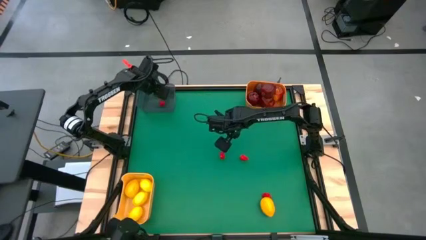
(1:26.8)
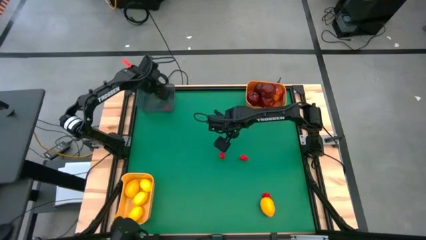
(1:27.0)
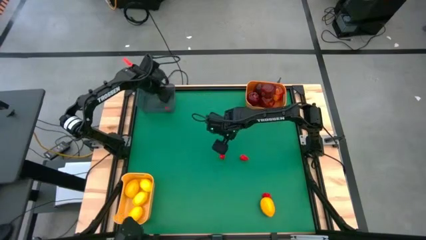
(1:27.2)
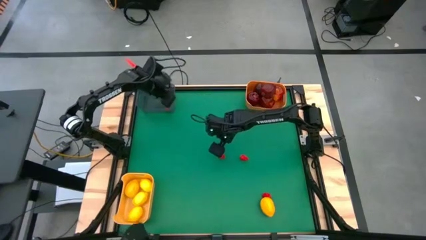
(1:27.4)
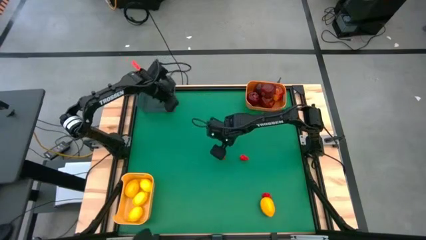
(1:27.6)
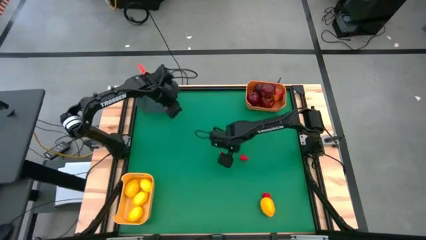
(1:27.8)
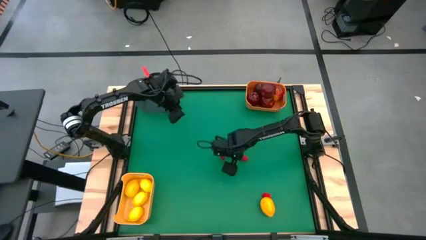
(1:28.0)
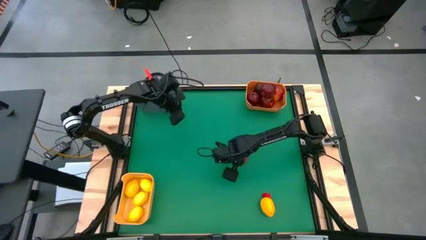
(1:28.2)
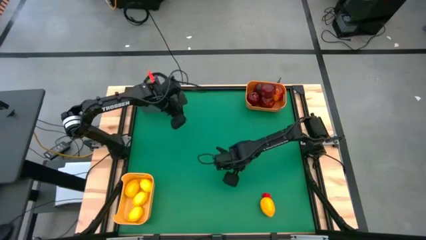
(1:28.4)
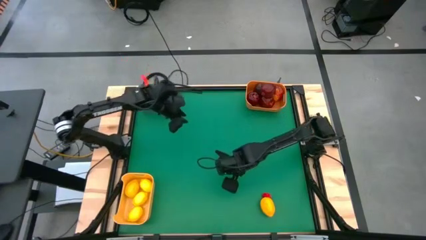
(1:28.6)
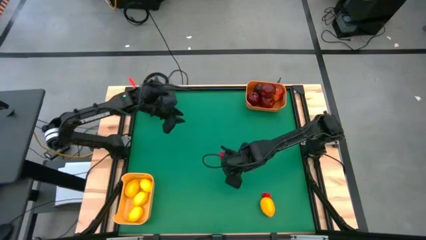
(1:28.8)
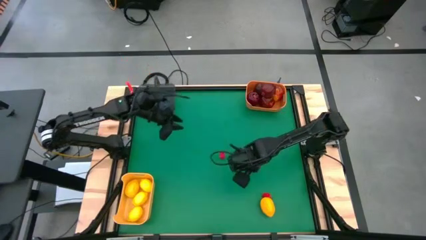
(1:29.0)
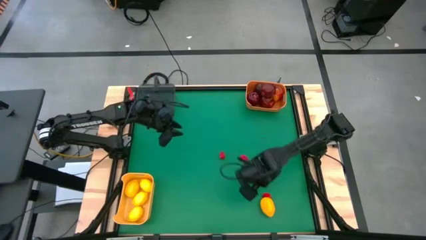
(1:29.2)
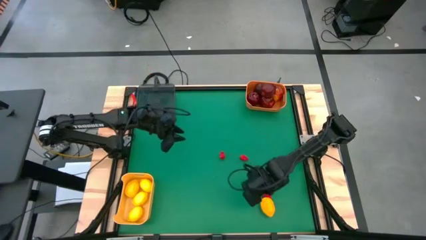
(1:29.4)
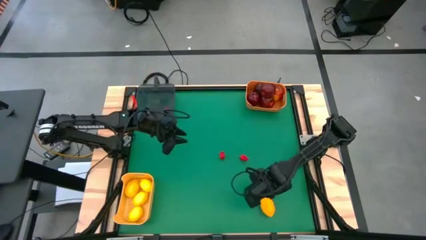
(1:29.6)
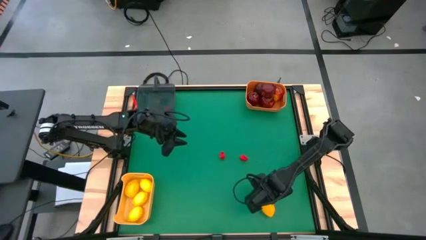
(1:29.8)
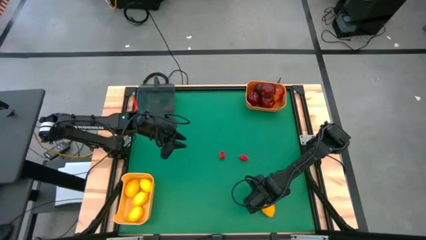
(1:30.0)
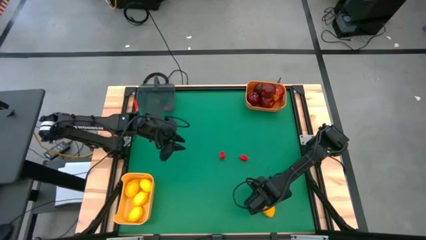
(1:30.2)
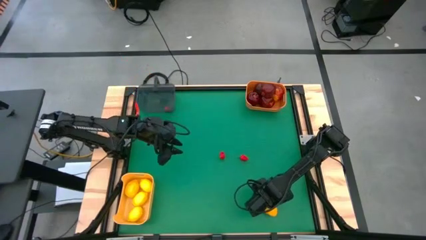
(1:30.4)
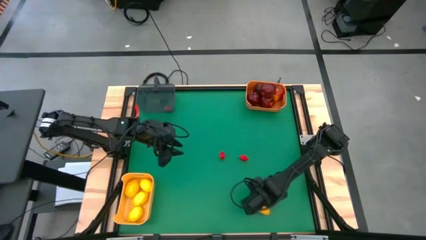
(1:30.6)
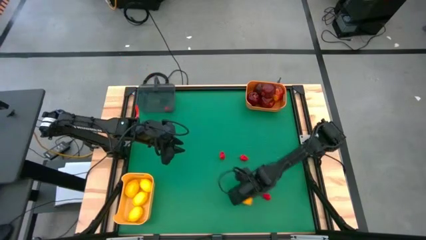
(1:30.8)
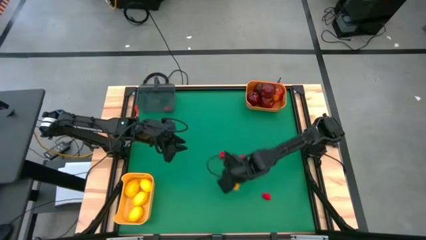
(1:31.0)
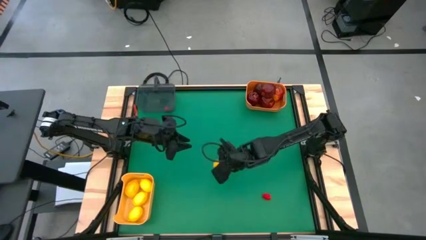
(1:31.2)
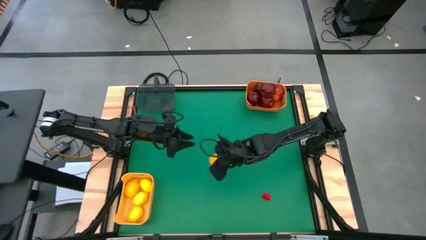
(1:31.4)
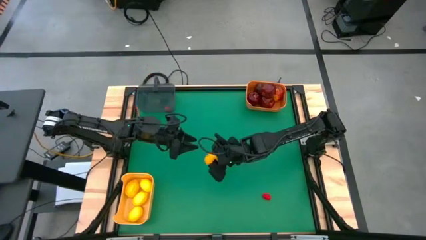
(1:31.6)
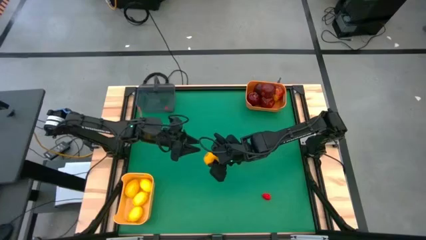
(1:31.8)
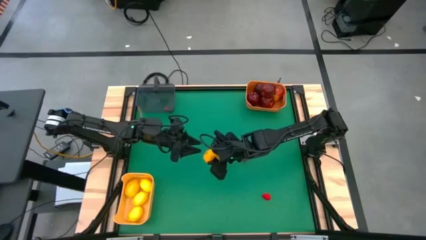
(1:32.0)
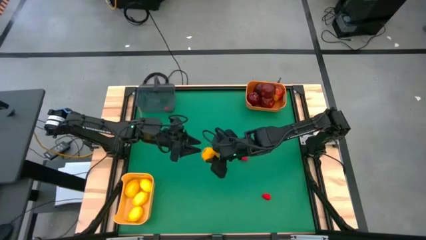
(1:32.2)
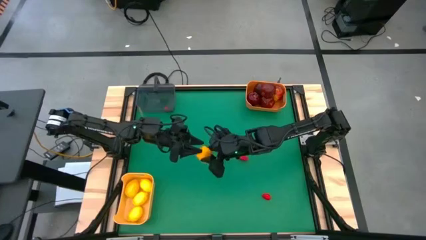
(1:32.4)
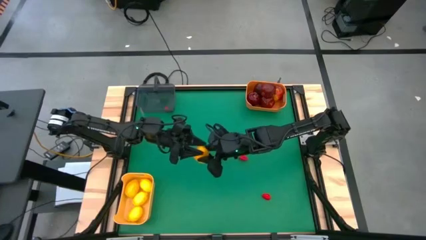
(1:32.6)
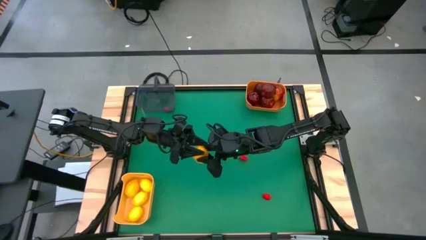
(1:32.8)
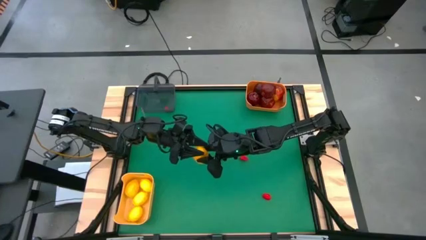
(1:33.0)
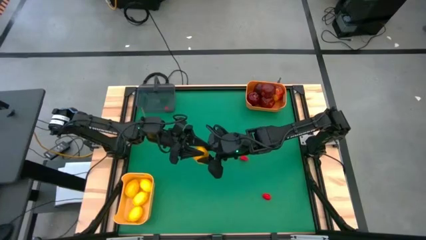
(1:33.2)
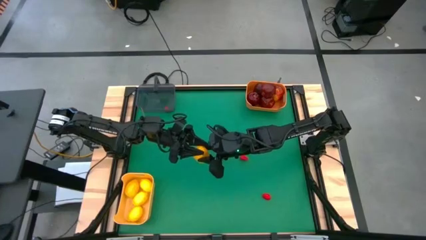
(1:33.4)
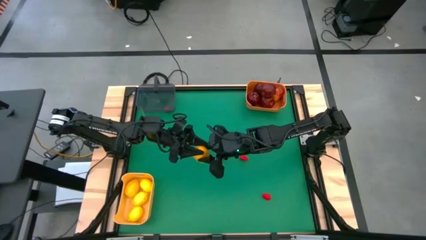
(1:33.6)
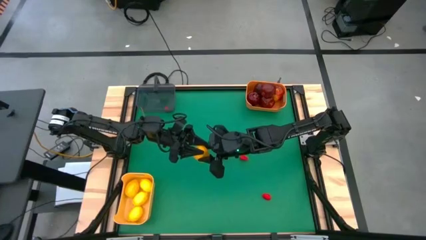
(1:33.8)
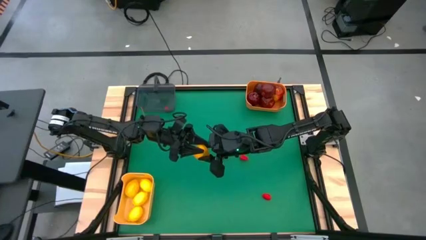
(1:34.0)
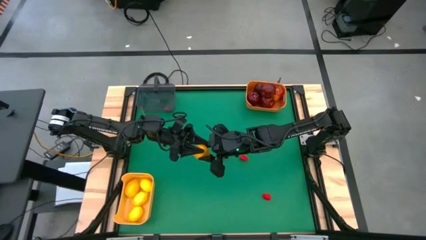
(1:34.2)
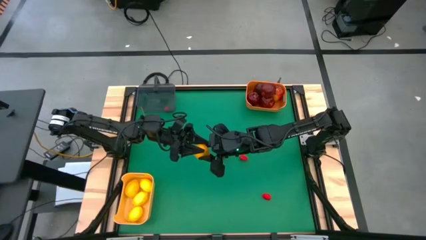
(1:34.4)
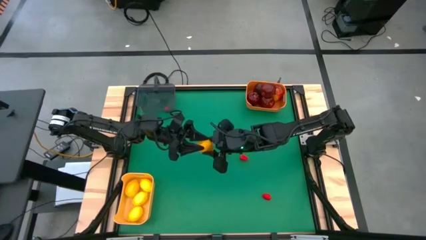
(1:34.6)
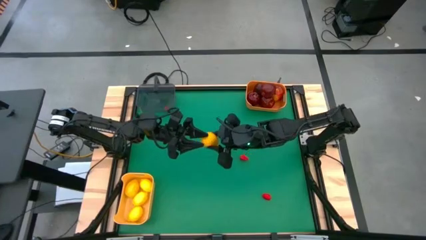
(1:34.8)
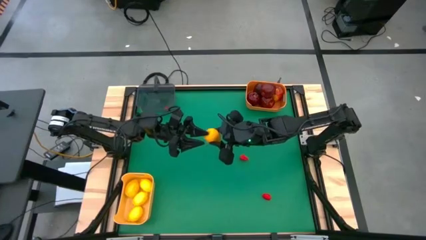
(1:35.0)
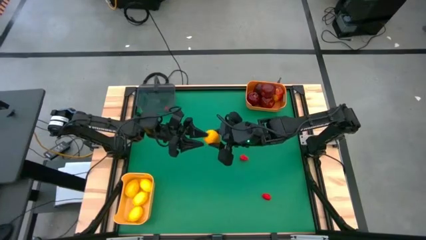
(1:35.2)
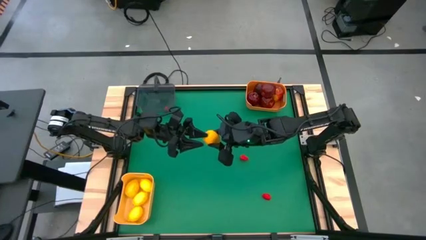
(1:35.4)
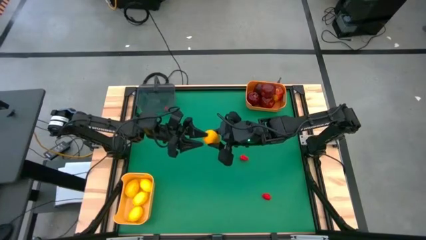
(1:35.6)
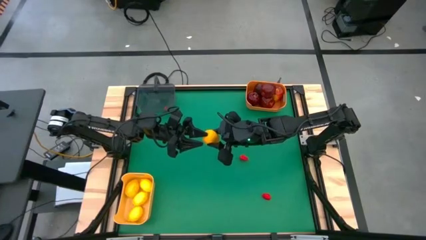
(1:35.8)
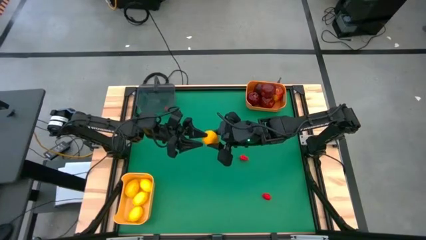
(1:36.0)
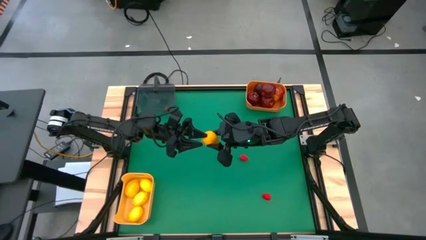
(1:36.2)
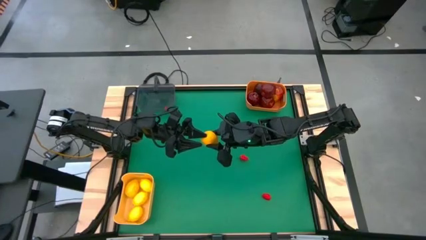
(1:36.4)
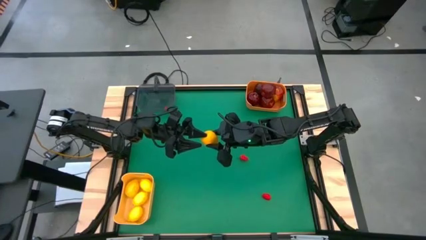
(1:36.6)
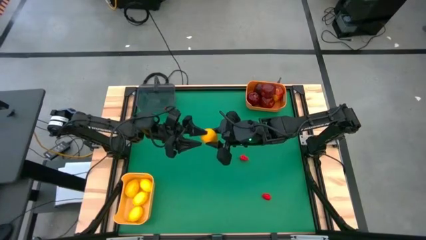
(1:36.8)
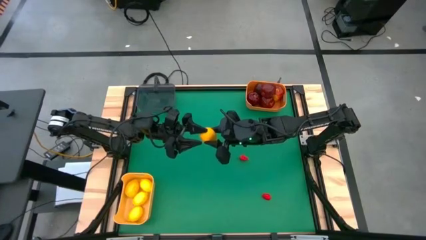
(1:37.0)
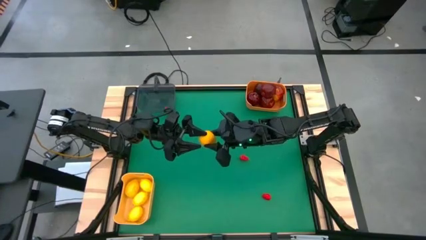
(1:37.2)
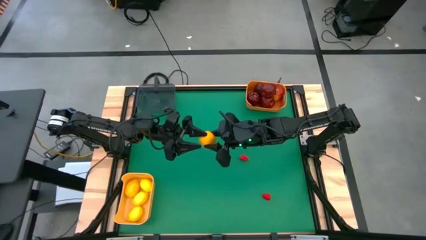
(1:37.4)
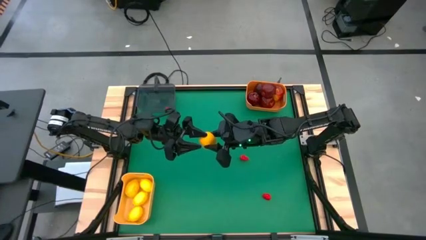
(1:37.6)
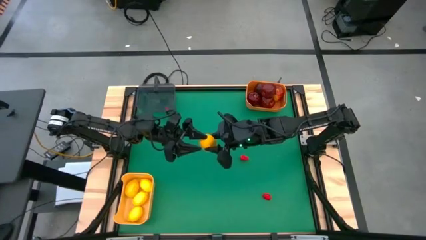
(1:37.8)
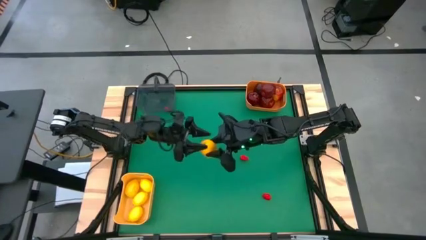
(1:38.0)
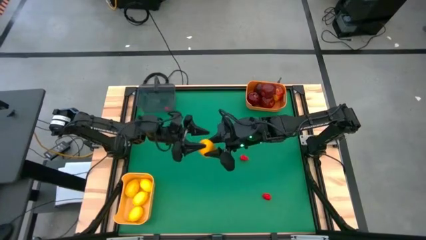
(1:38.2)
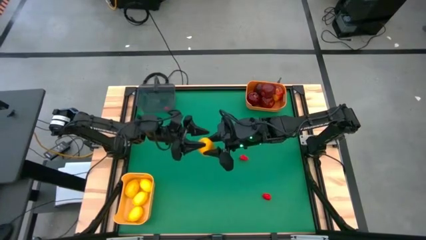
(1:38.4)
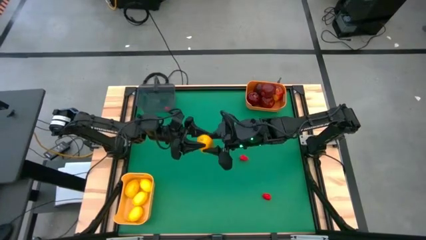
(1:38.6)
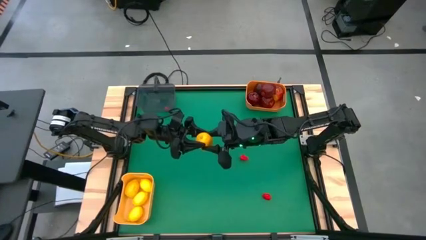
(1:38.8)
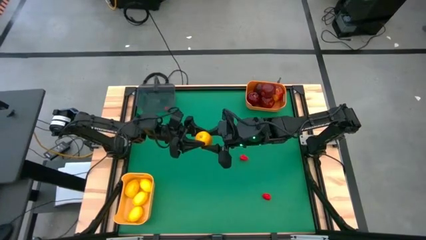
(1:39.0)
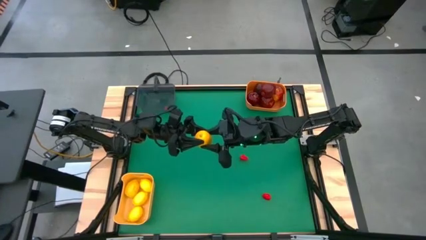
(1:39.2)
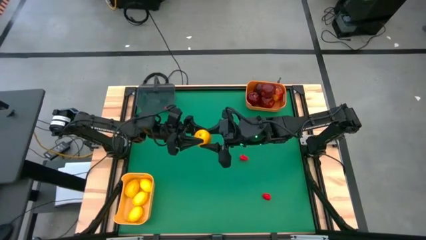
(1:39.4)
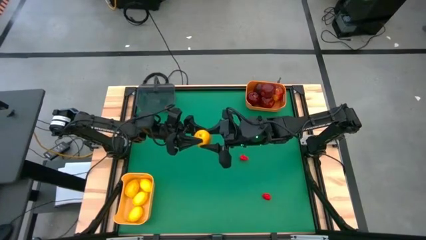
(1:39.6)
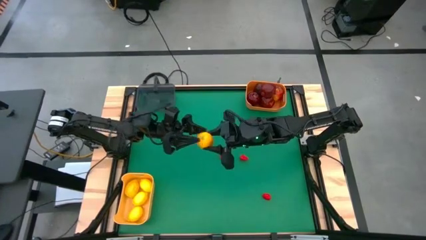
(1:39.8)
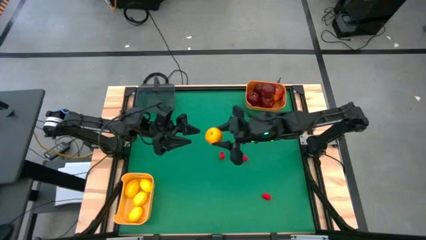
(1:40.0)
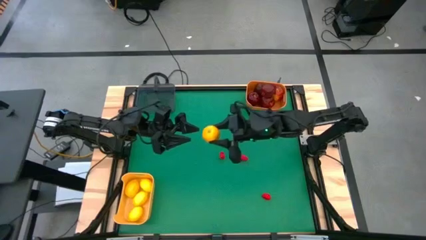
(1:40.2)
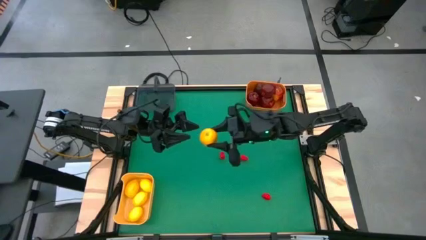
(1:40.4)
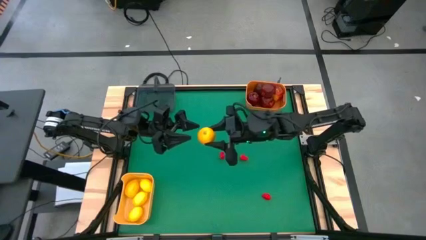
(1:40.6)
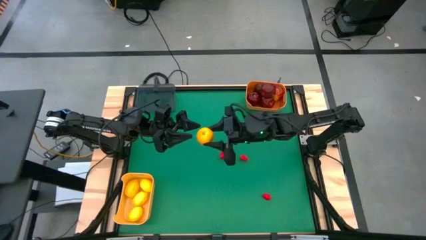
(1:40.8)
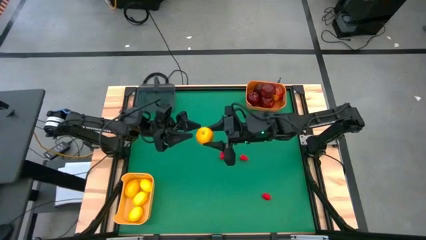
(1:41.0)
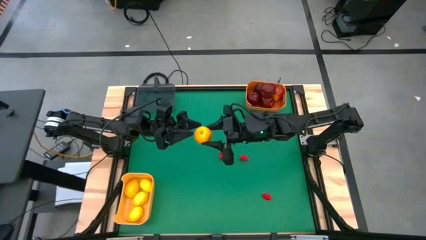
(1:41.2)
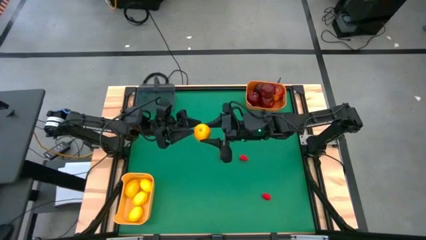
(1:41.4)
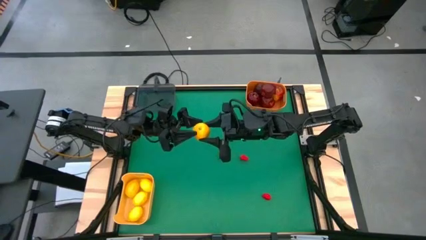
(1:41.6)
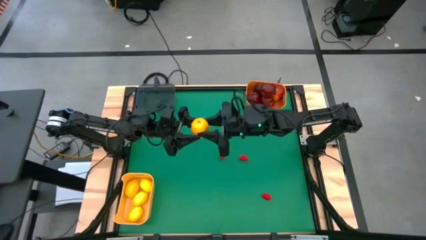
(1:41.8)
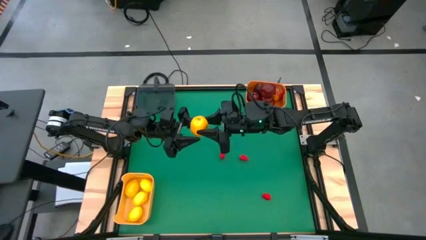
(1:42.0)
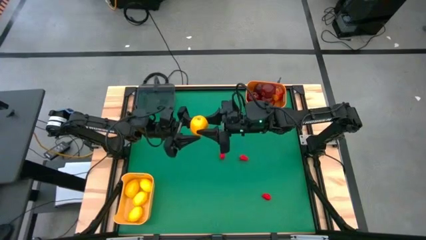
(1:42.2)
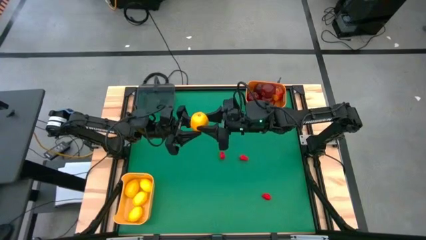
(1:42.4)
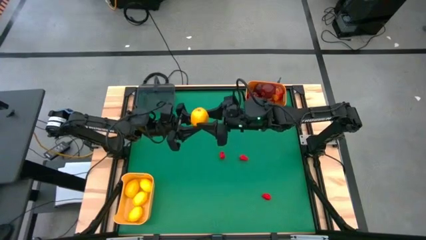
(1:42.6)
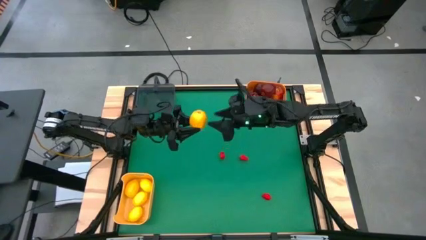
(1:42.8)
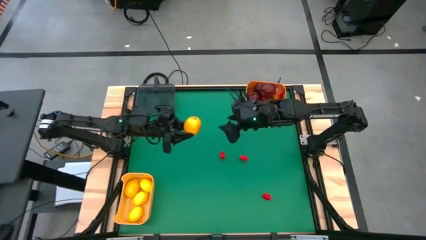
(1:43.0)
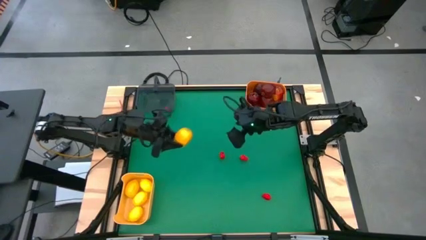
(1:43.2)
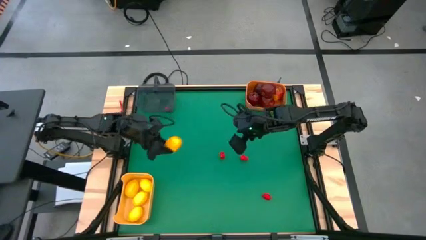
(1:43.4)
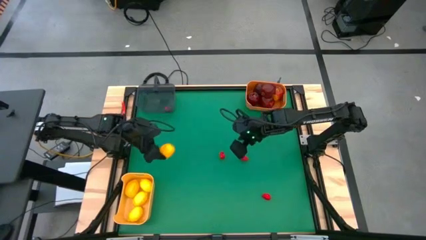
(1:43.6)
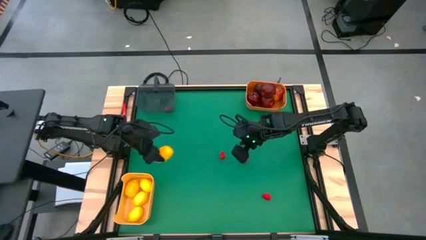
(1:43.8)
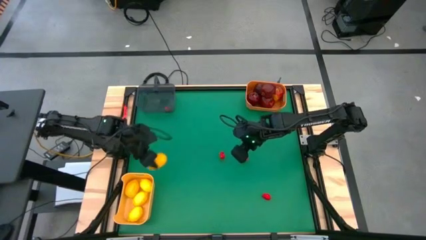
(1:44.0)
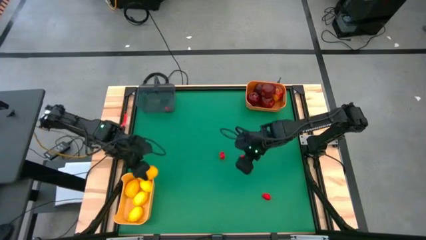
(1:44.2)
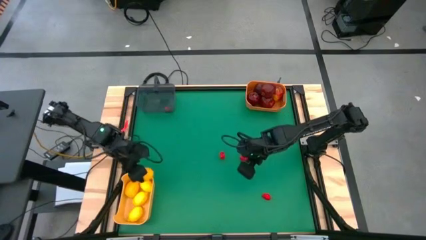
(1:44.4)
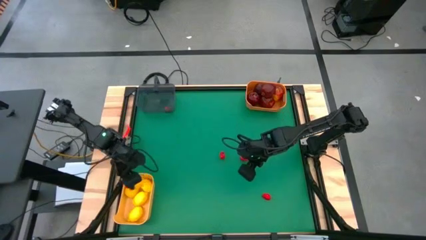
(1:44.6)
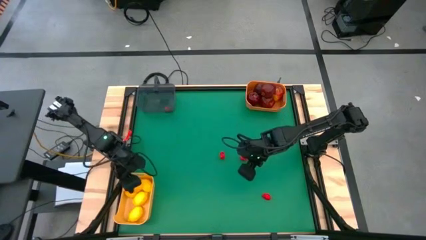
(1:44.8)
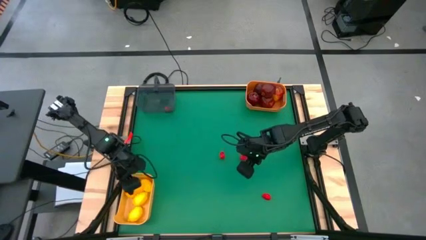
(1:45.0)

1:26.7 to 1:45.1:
Task: Sort produce into baskets
Put the lemon into the yellow bin
